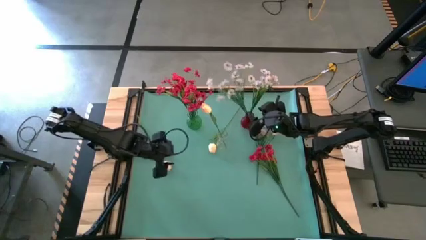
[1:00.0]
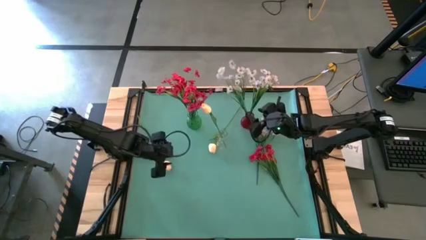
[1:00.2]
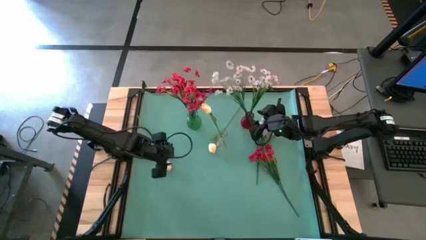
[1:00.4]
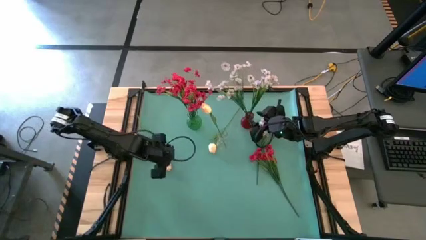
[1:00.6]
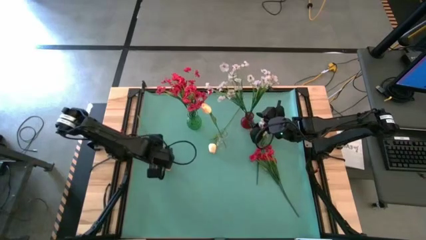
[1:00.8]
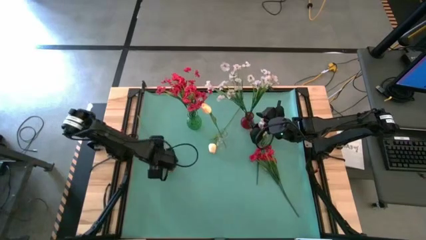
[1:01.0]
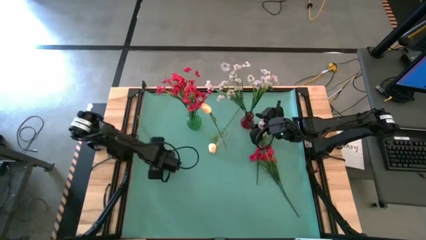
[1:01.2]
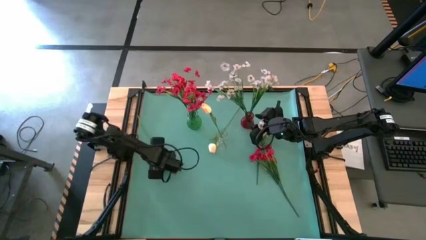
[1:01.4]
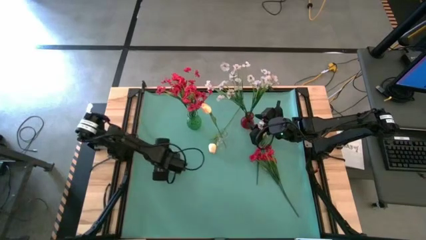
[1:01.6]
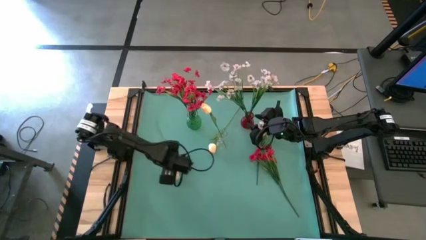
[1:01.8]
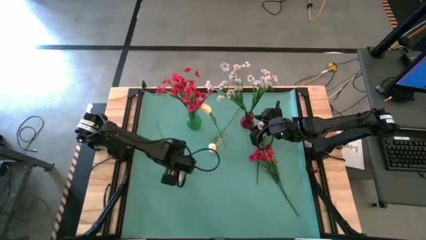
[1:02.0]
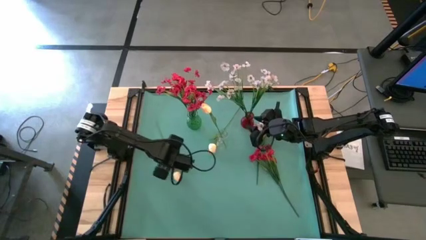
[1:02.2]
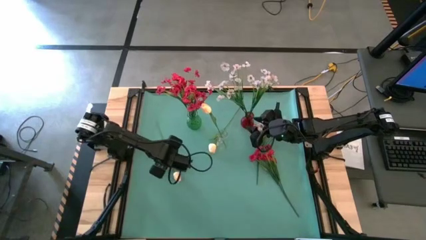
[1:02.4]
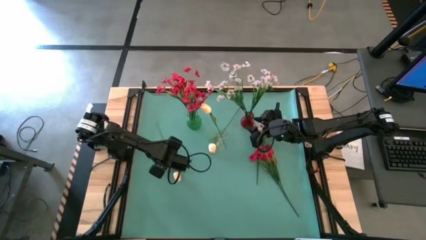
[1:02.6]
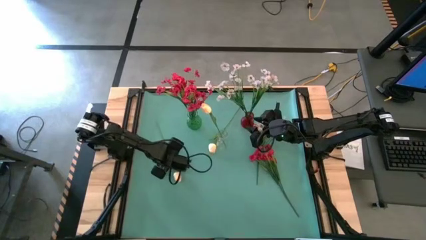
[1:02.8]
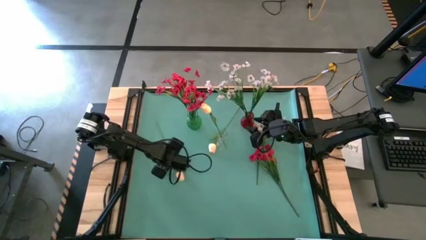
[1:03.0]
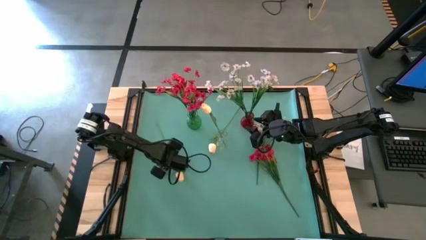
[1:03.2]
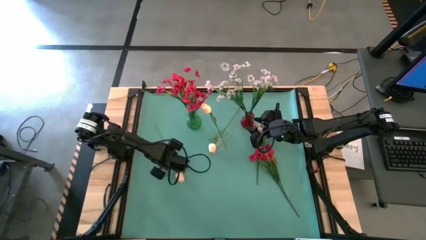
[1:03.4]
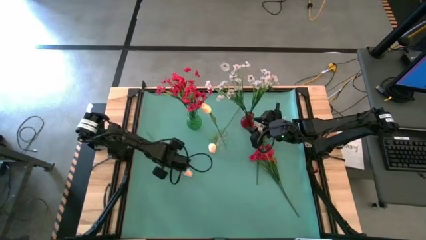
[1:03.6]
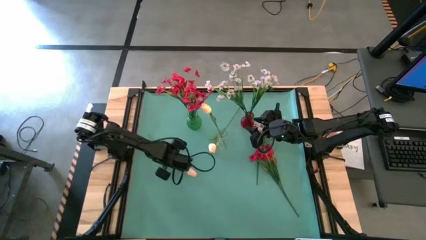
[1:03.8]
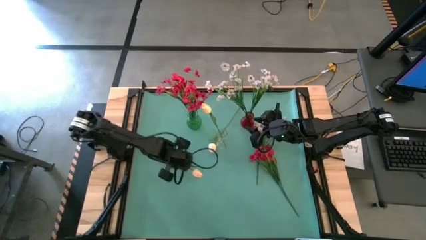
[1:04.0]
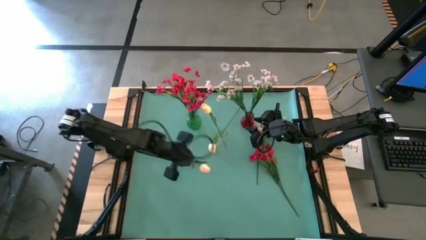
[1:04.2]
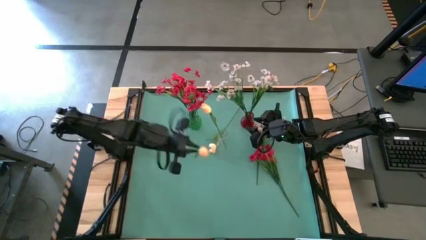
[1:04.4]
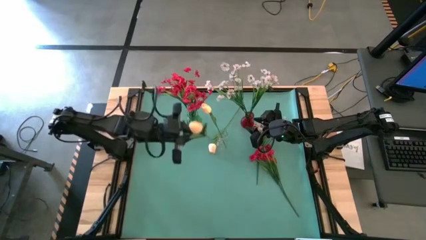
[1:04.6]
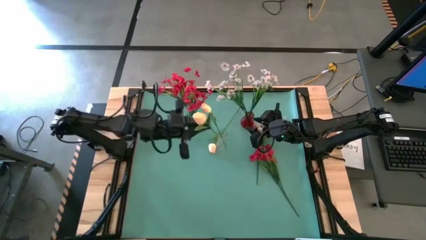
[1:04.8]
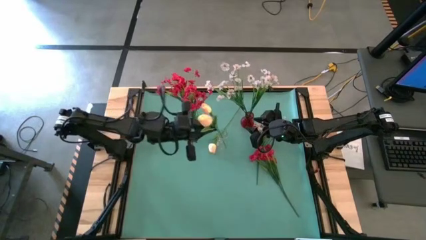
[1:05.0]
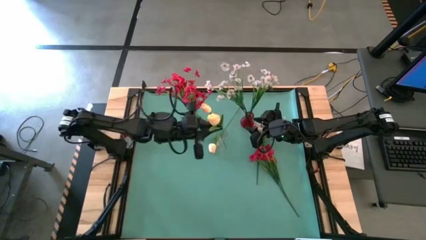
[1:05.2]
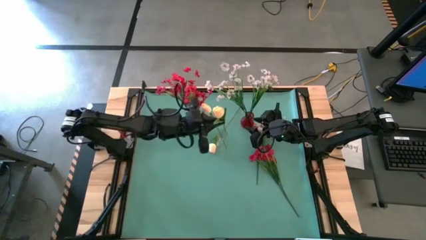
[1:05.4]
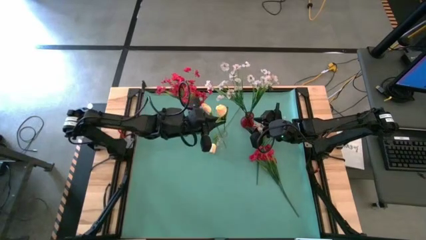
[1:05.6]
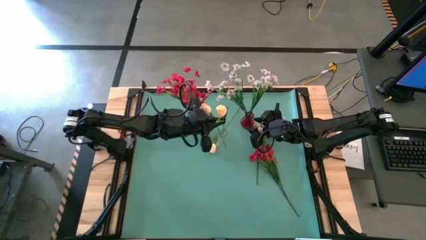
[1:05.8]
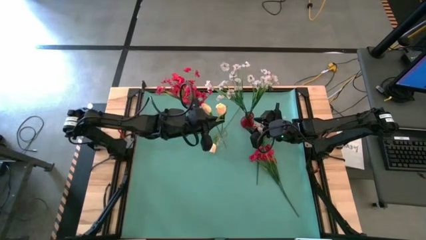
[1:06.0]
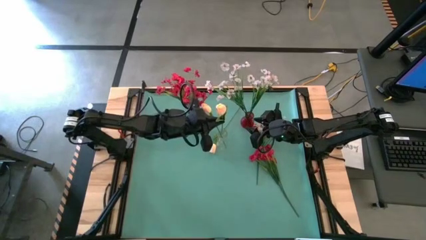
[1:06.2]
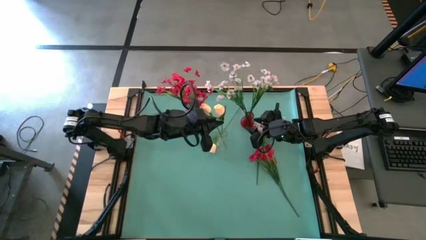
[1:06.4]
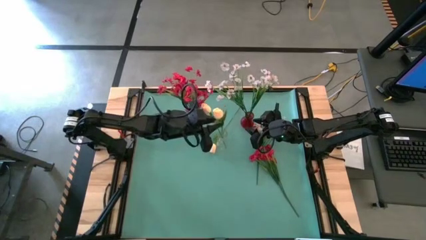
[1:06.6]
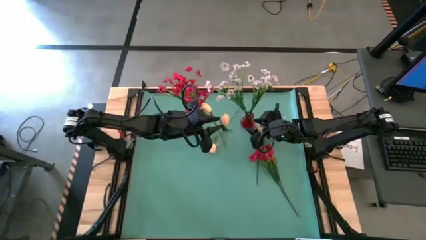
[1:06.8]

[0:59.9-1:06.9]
Task: Sort flowers into vase by color
Put the left yellow flower into the transparent vase

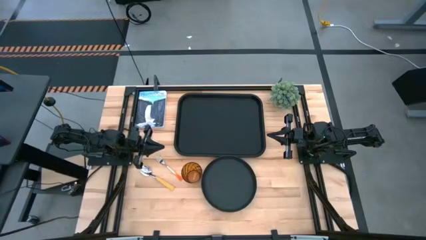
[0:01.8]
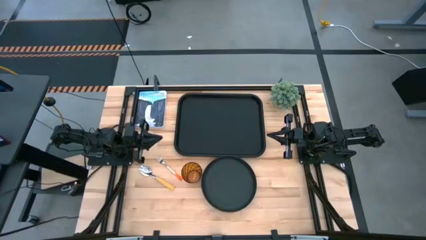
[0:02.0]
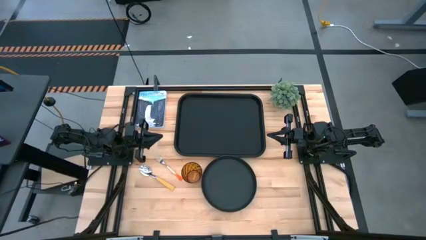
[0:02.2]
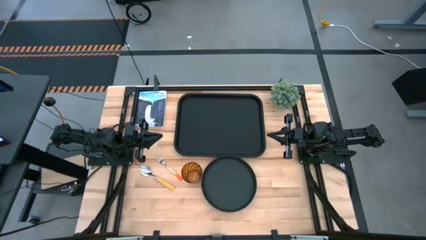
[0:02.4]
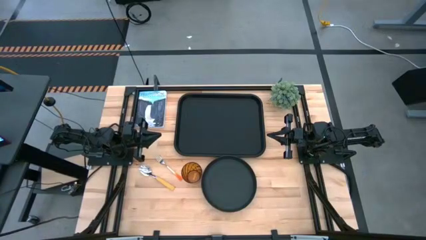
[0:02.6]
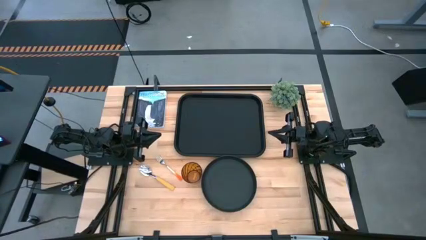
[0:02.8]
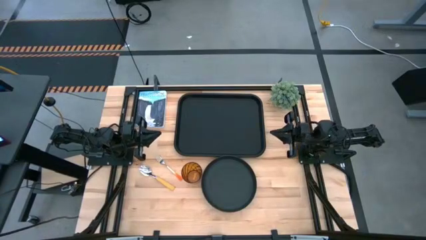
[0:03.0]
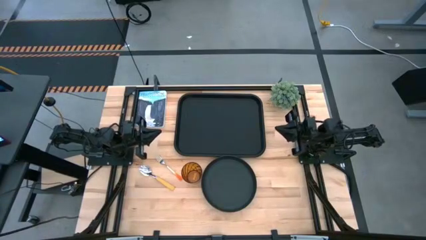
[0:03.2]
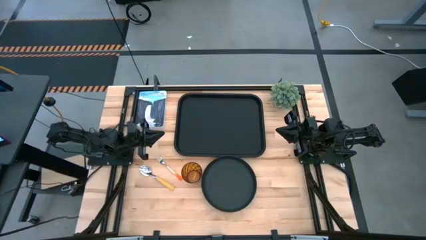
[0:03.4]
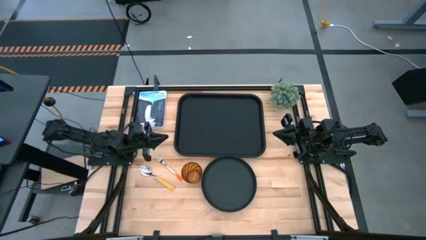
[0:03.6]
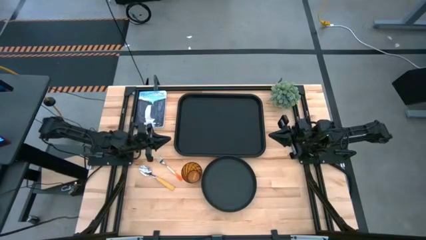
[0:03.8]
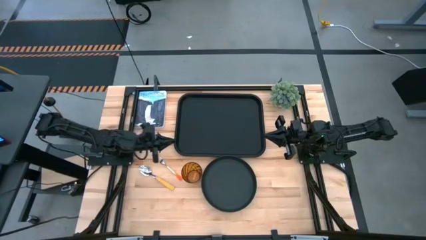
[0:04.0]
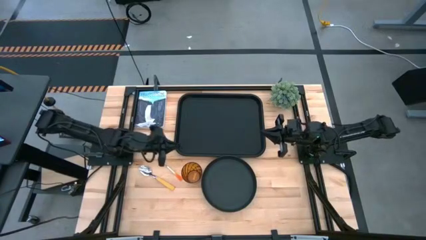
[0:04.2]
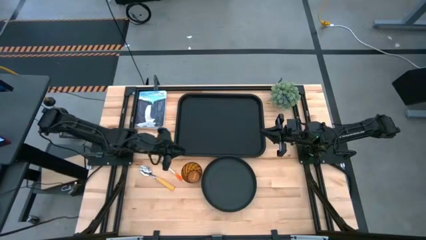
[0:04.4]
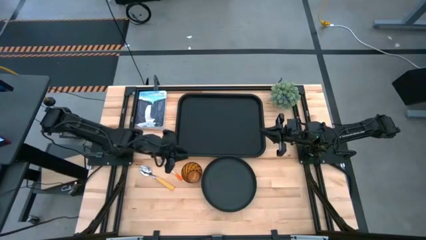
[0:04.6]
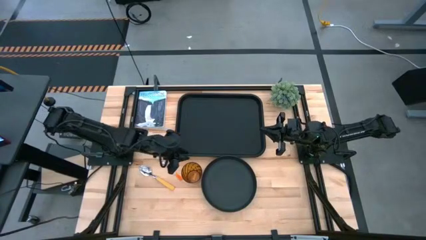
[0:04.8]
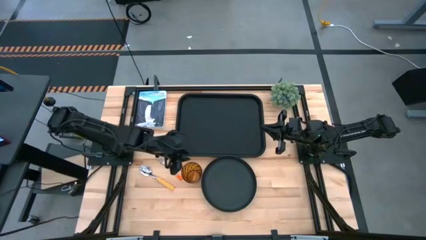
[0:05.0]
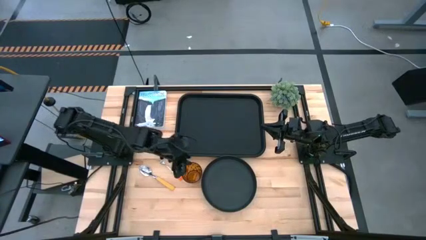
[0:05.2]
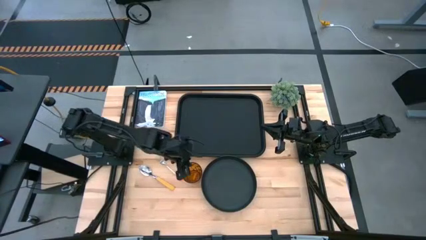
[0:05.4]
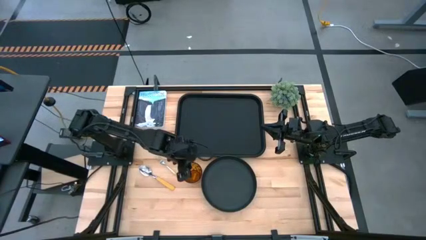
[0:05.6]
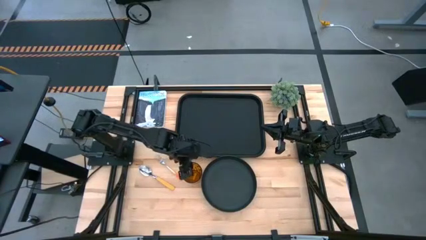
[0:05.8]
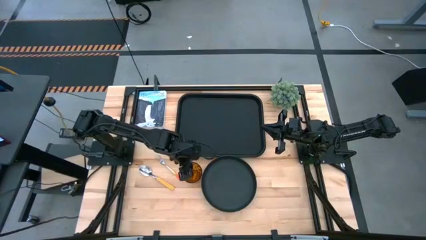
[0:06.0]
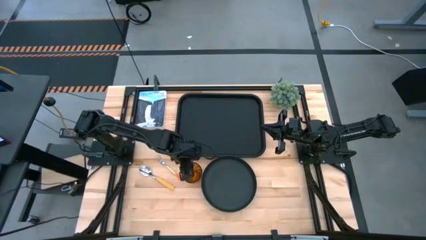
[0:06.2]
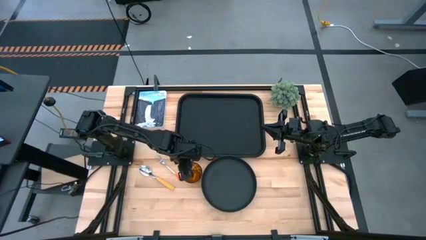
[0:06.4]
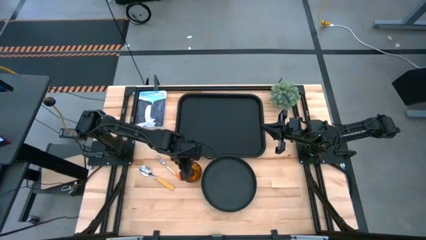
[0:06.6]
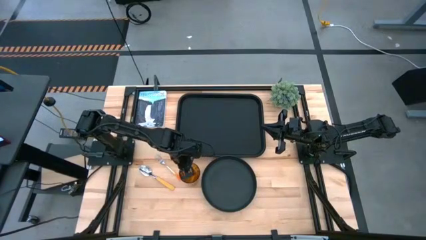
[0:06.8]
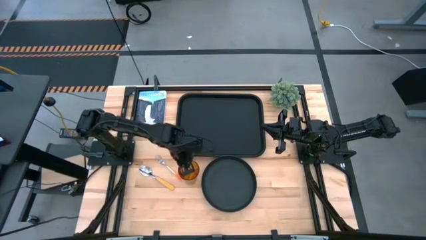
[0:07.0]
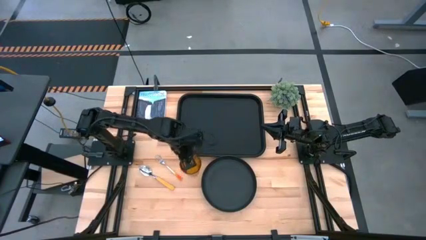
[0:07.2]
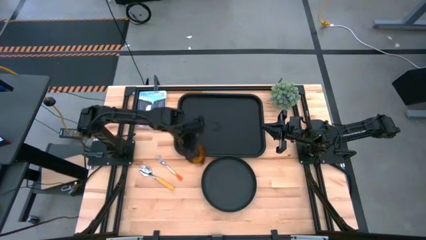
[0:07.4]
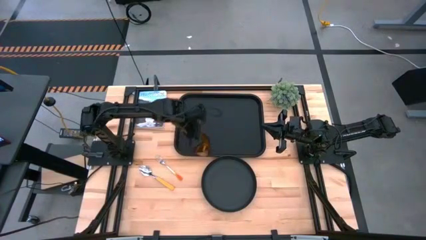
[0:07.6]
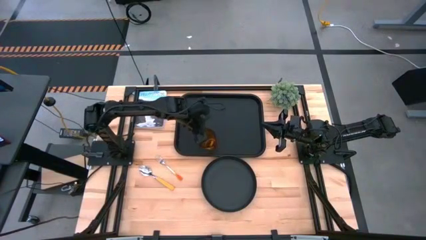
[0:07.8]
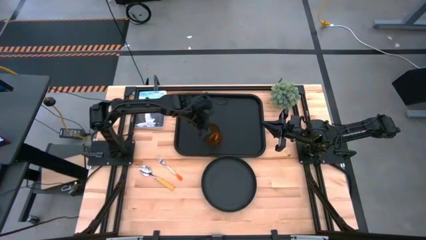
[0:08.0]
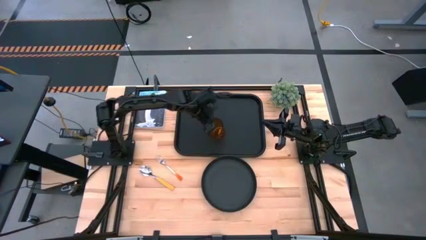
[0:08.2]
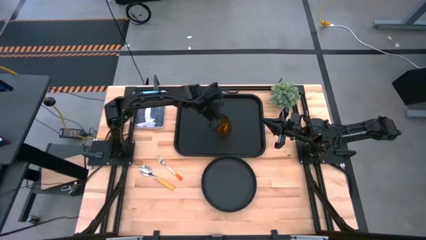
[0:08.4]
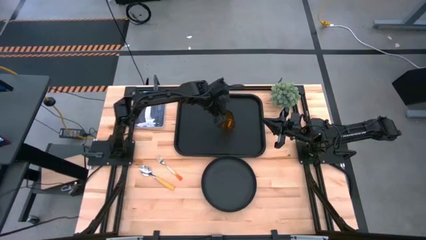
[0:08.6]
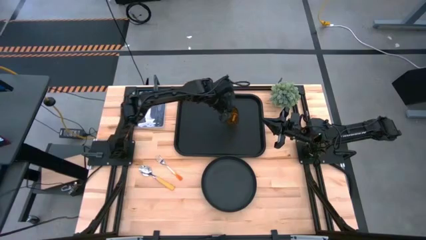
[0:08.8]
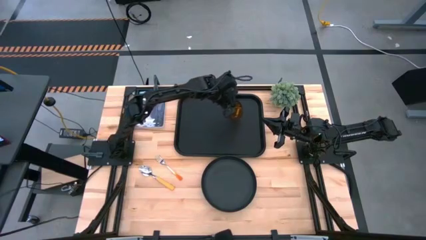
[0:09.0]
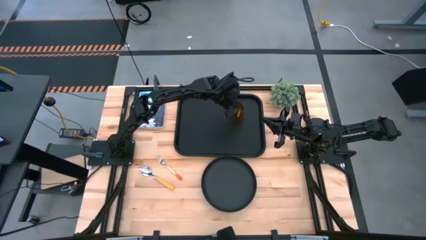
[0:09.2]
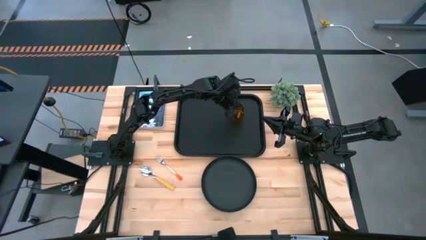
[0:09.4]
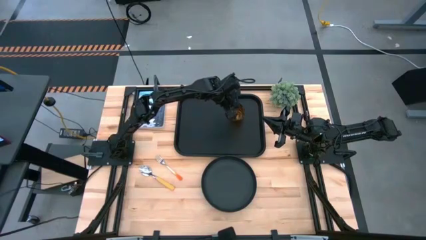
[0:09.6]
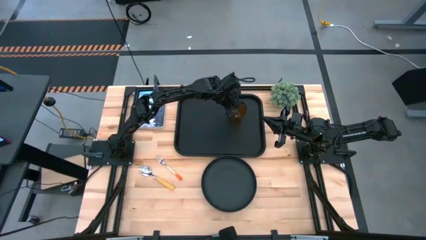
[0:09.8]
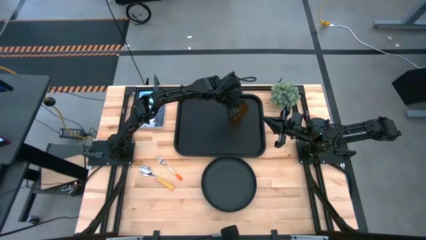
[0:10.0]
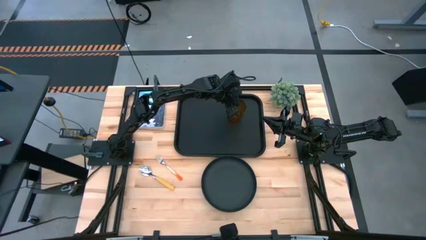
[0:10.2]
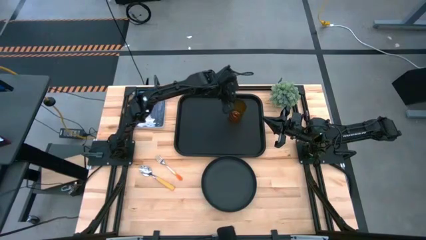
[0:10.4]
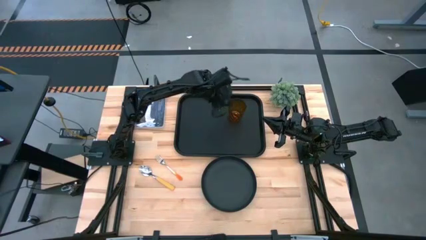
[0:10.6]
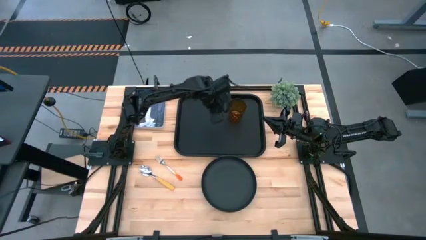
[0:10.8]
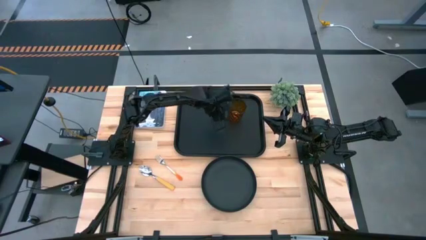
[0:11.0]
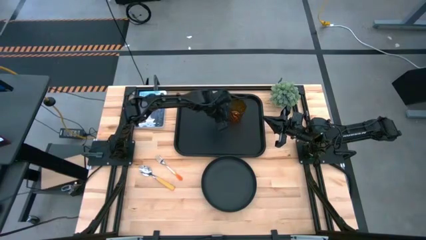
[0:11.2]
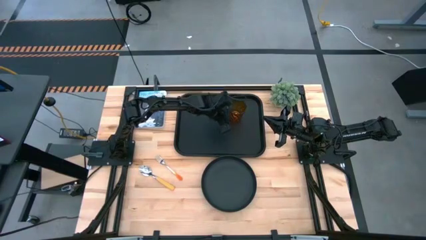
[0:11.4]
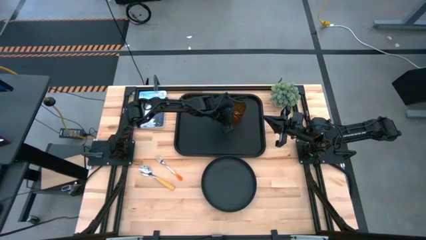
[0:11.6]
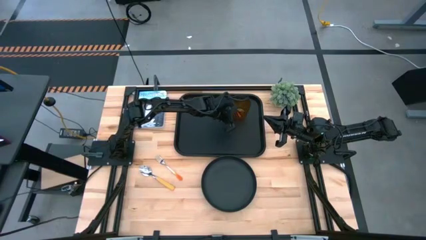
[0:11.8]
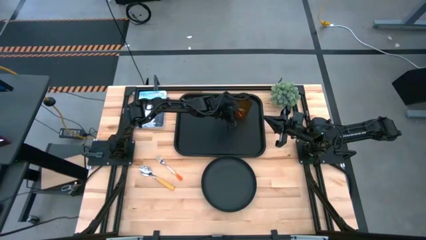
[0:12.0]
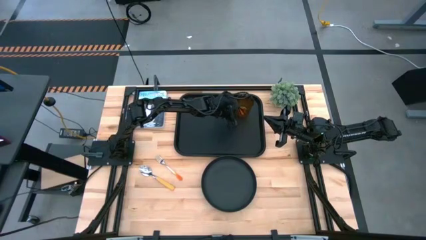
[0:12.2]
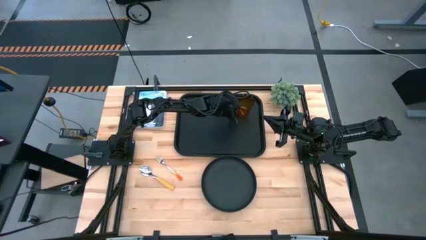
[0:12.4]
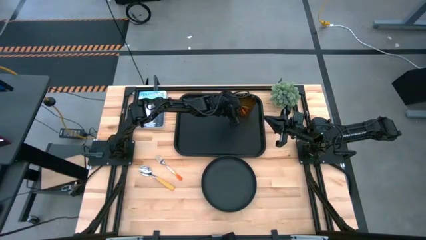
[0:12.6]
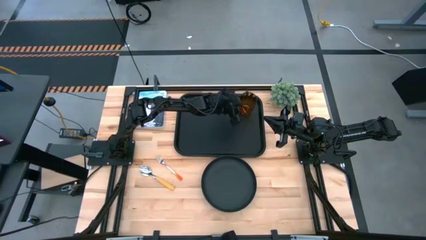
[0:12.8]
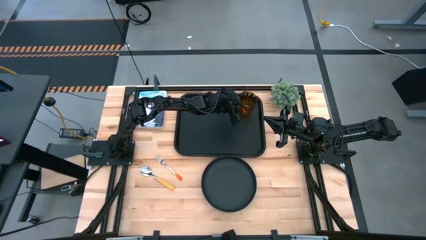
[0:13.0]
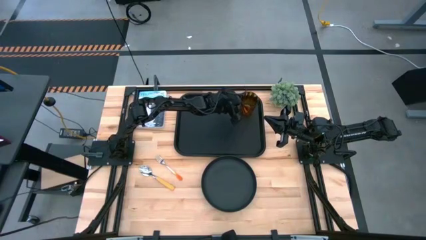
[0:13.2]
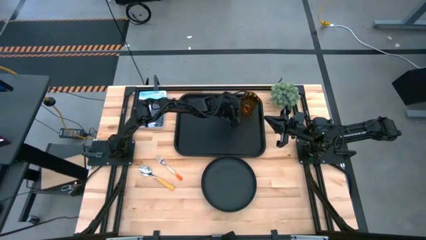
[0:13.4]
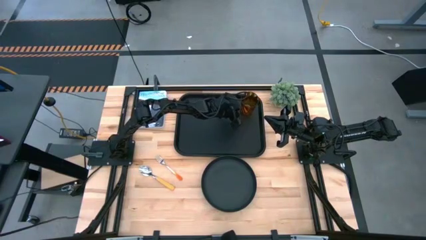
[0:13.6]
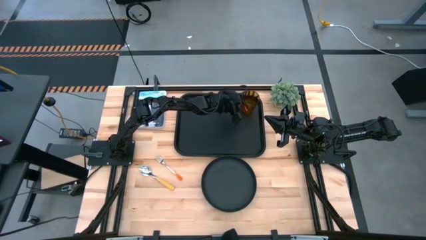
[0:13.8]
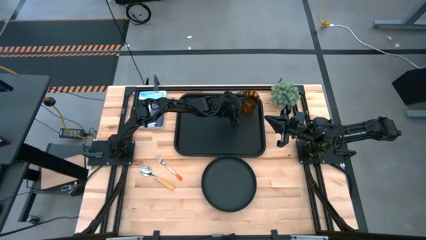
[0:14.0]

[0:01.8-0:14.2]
Task: Pick and place plate/cup/fork/spoon on tray
Put the brown cup on the black tray
